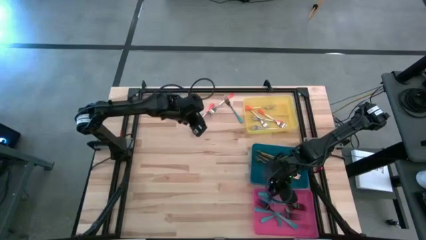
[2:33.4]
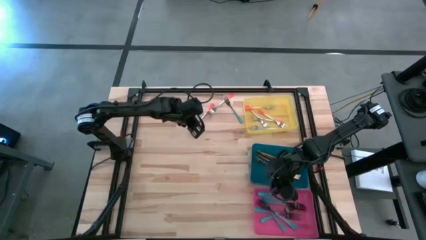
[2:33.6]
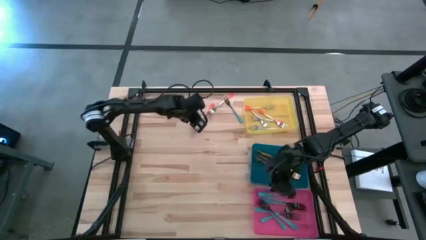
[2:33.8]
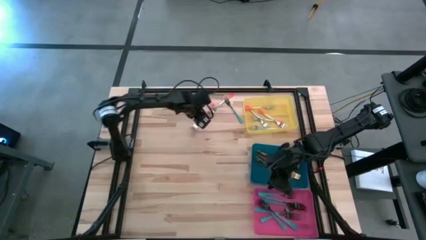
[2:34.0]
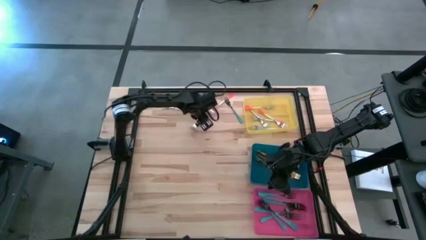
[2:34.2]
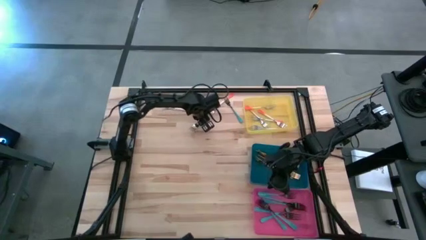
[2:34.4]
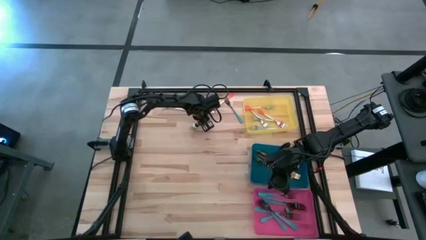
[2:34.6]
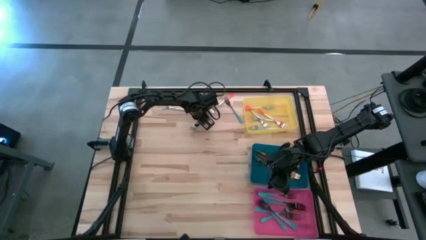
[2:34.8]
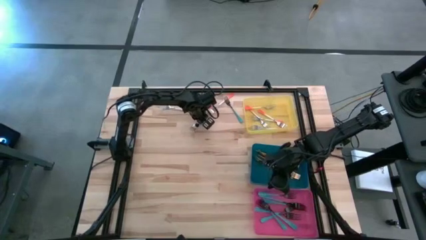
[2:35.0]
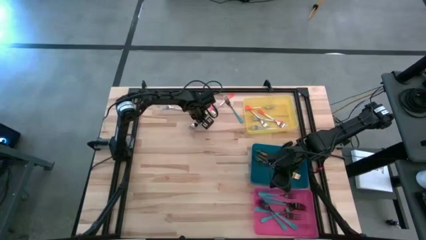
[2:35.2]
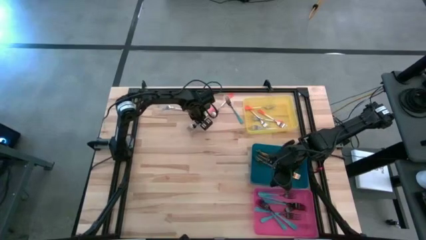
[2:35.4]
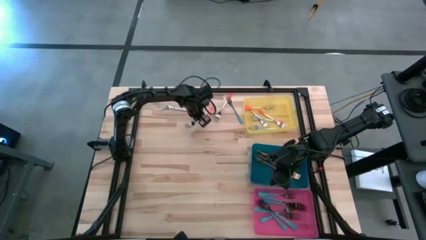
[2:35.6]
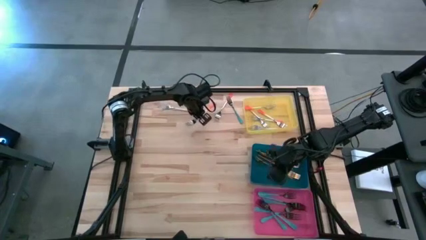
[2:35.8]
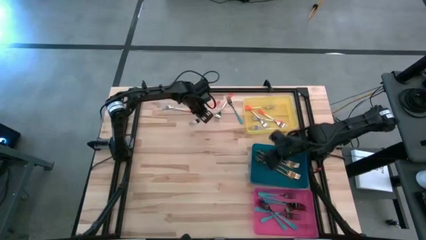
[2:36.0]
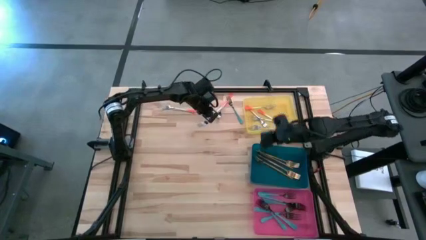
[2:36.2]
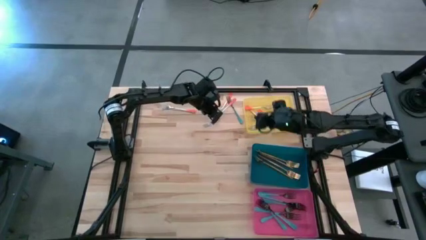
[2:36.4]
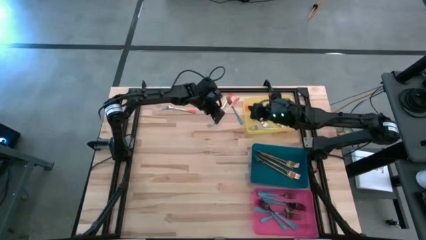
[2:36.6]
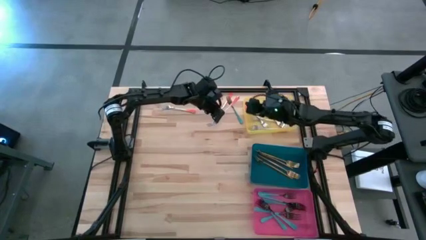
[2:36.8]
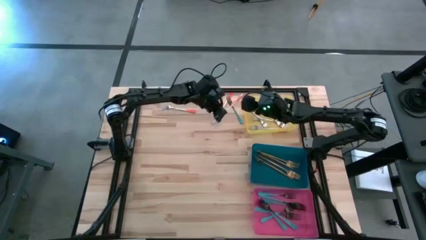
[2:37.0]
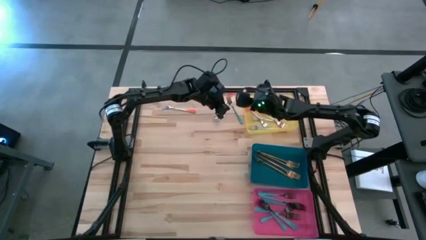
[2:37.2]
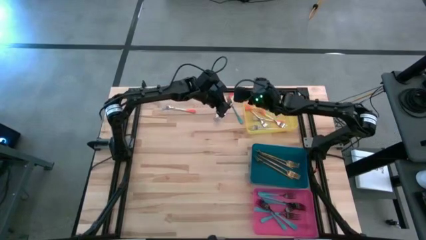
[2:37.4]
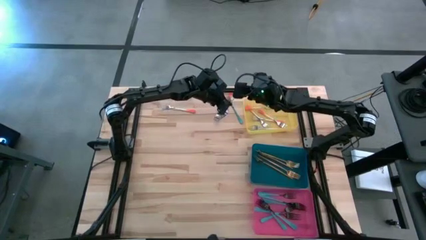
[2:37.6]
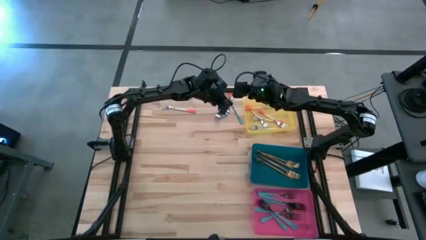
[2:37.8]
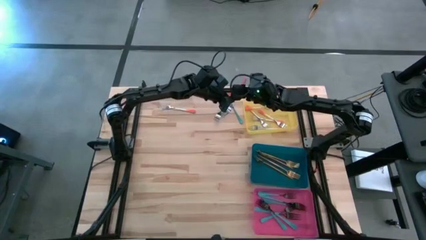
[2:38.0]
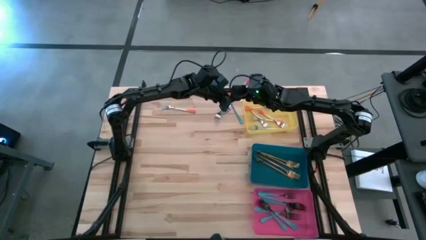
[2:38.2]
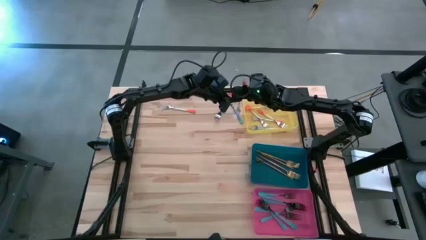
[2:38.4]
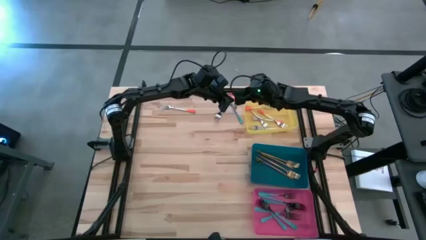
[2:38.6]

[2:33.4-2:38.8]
Task: Sort silverware by color (type)
Put the orange fork into the yellow bin

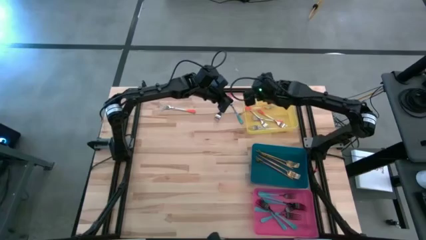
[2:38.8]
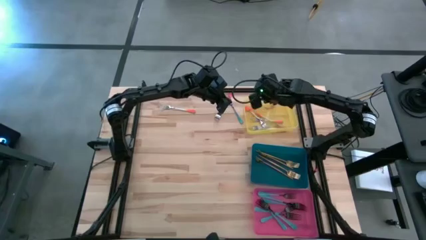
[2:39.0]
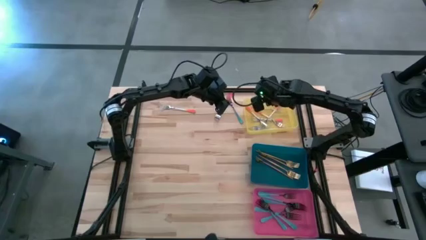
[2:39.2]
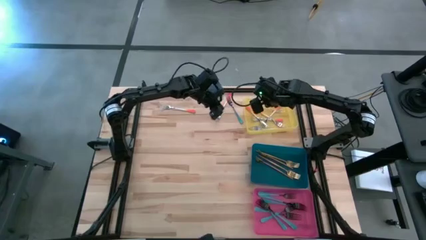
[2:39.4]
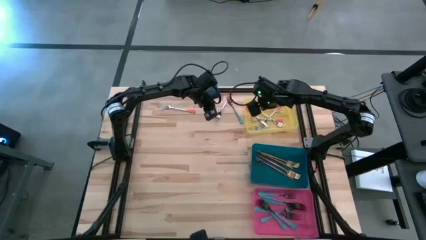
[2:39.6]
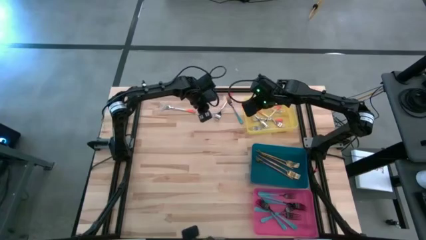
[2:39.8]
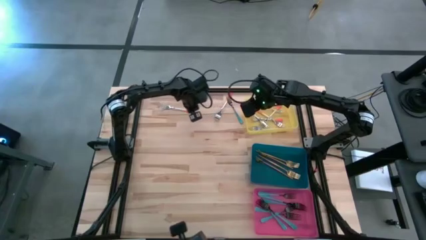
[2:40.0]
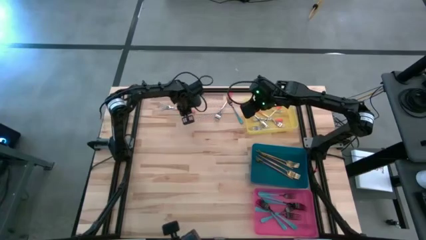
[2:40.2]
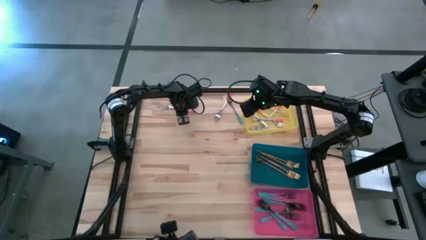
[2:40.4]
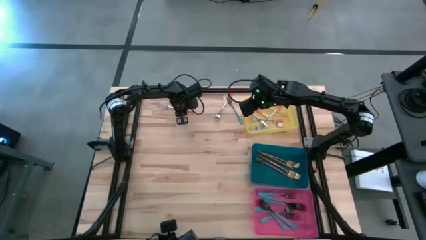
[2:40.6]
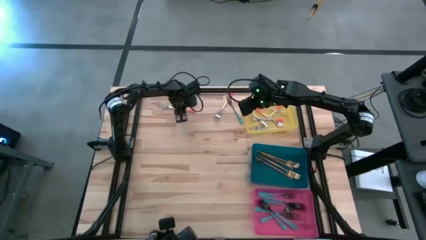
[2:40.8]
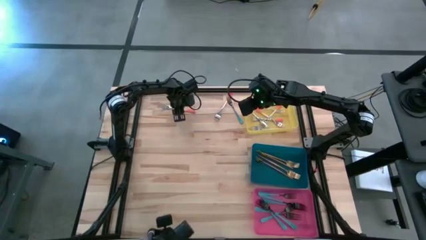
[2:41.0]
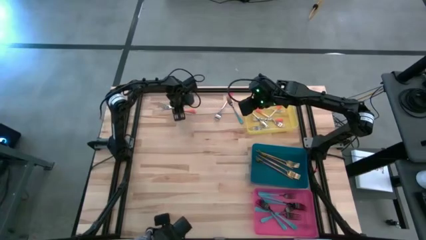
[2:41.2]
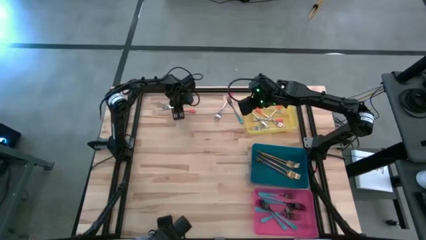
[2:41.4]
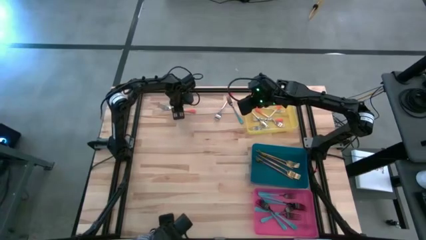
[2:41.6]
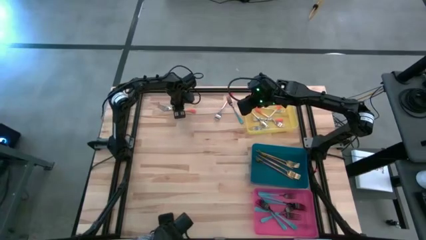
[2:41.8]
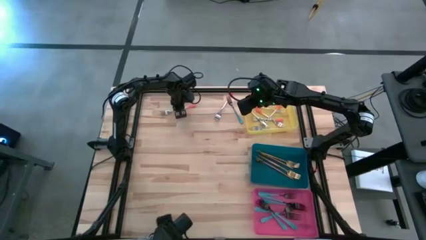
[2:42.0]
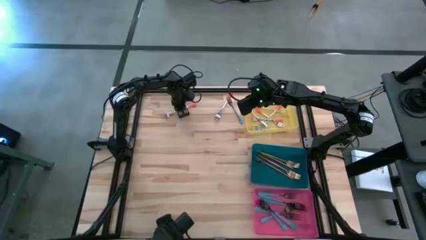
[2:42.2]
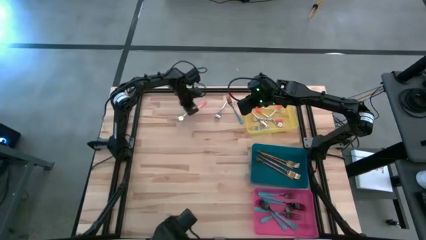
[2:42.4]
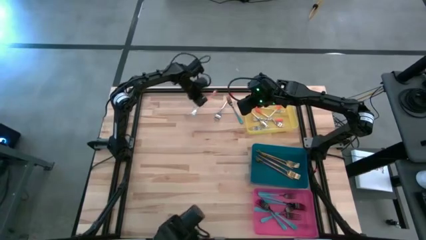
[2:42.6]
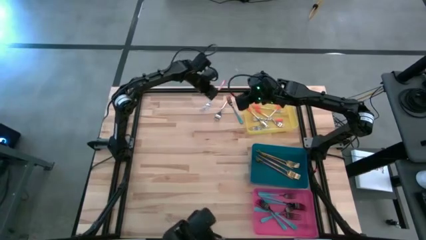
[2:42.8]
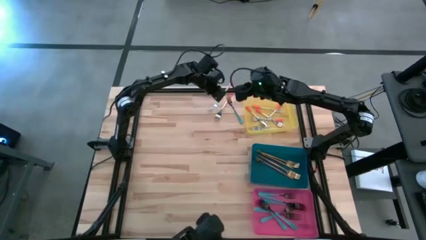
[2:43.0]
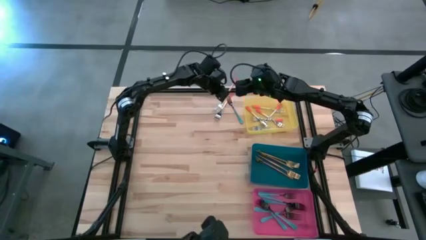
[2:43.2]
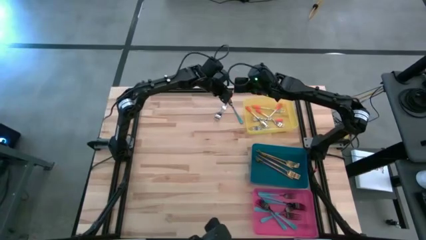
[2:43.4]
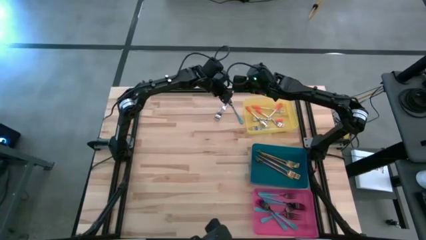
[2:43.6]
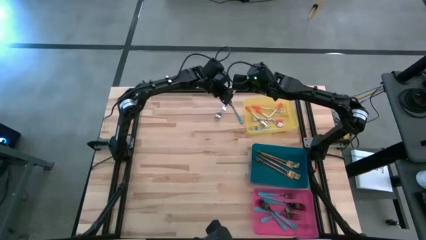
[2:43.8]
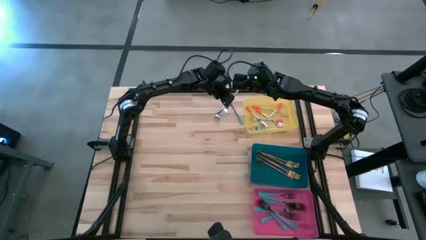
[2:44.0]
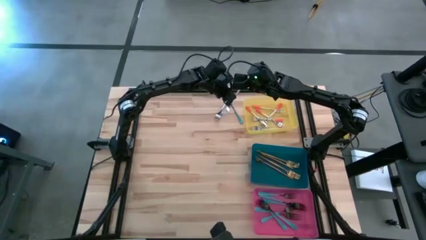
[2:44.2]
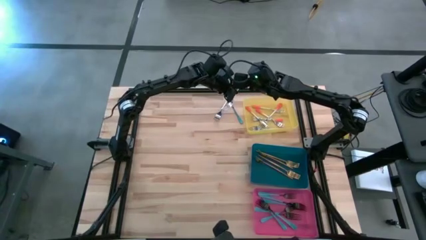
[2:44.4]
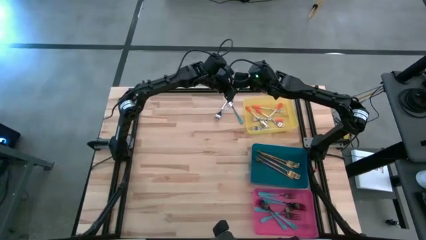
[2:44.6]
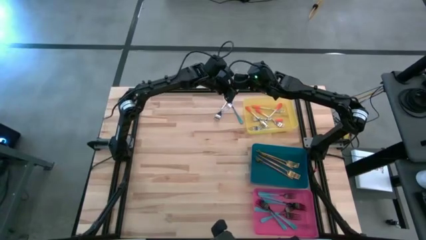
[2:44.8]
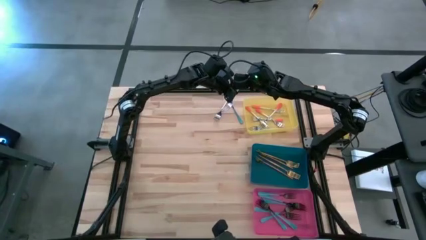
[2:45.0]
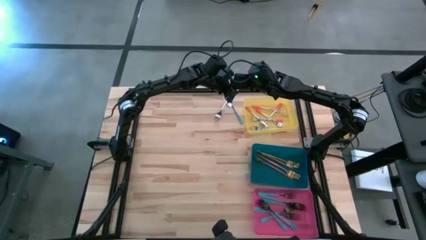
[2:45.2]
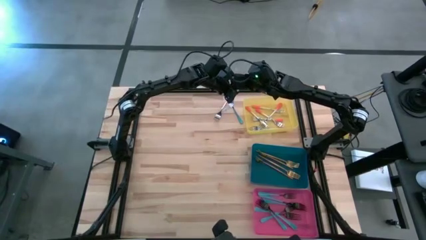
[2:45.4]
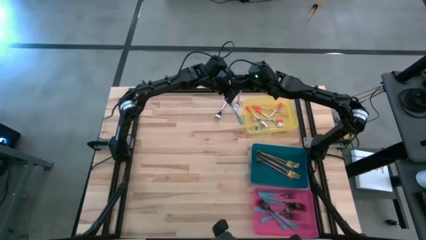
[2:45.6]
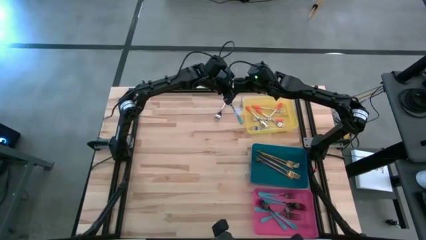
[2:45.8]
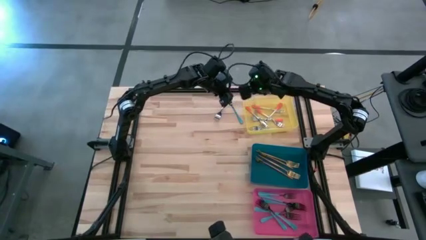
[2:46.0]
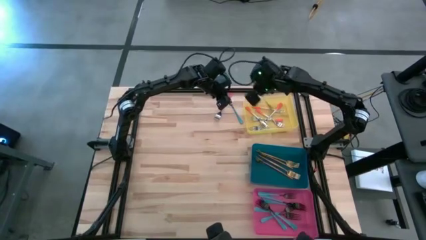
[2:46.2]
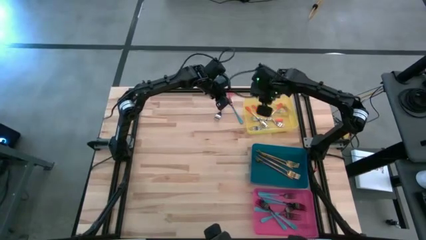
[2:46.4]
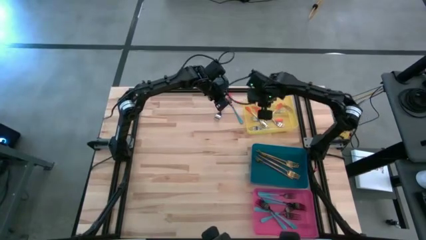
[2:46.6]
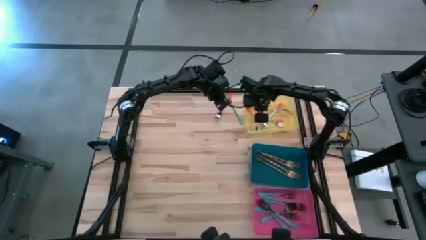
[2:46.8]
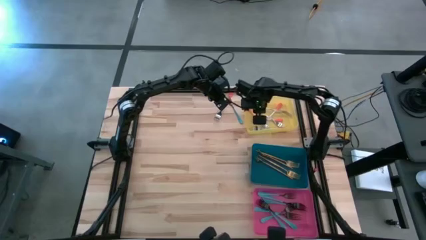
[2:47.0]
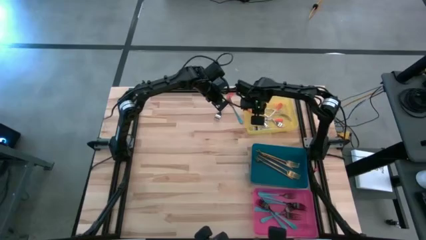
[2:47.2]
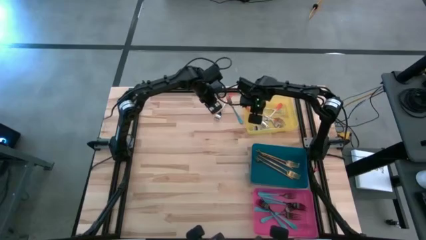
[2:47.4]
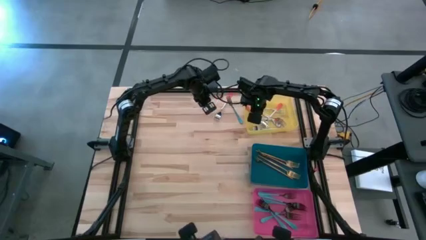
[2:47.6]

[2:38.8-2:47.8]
Put the orange fork into the yellow bin

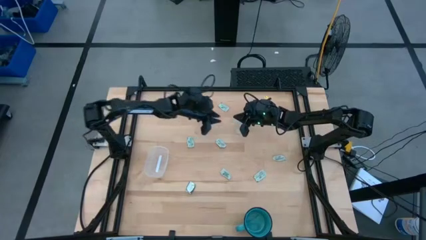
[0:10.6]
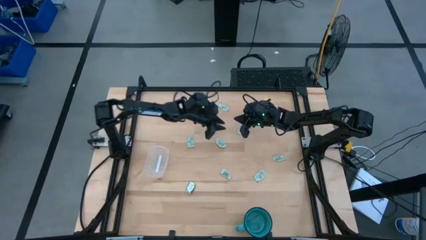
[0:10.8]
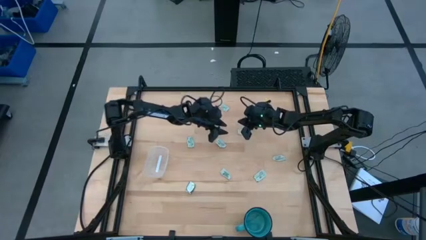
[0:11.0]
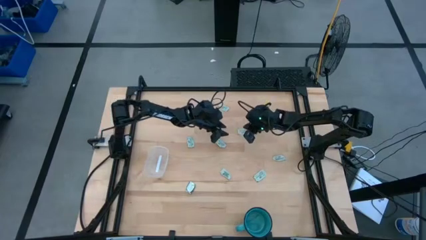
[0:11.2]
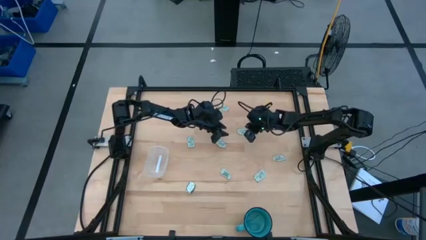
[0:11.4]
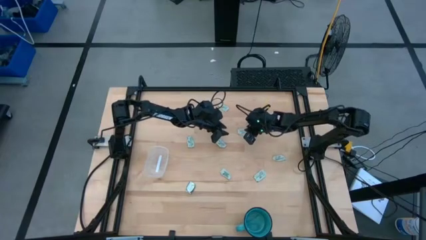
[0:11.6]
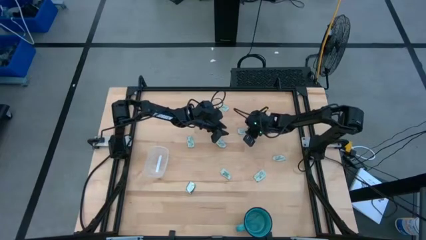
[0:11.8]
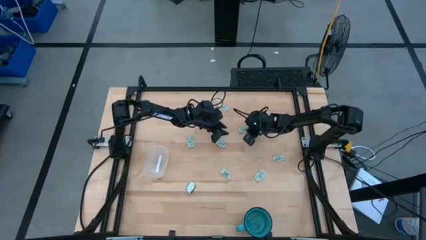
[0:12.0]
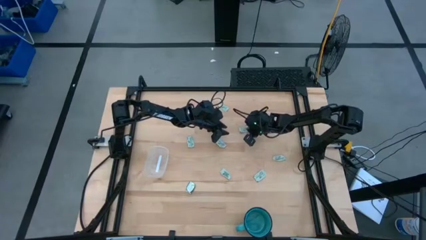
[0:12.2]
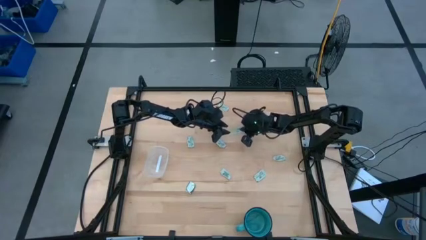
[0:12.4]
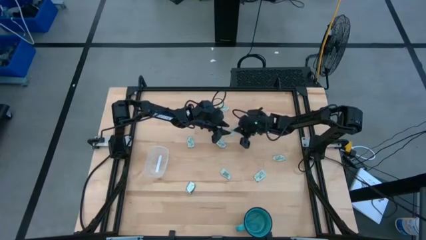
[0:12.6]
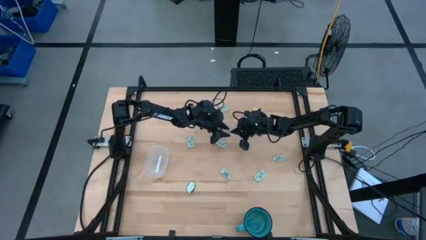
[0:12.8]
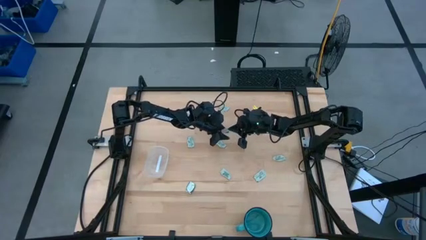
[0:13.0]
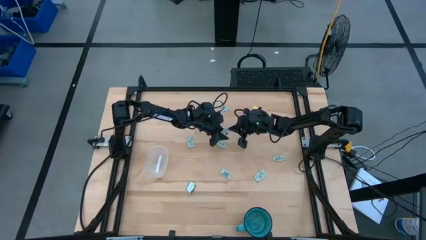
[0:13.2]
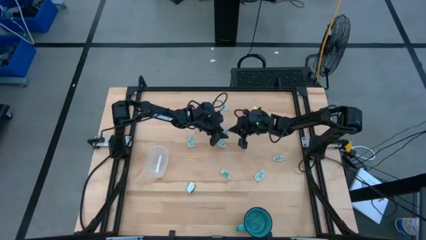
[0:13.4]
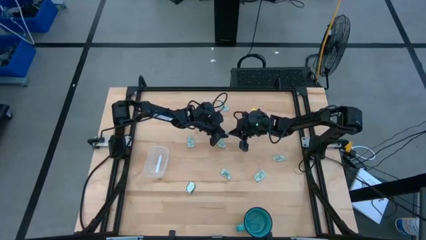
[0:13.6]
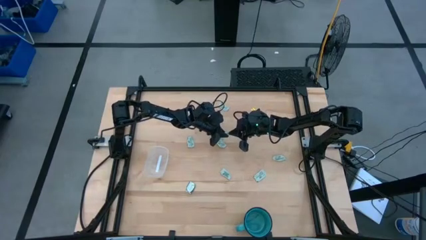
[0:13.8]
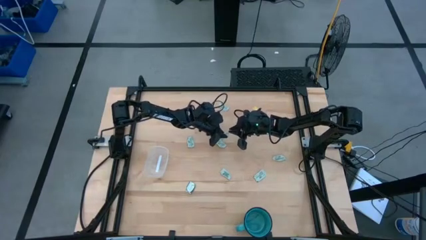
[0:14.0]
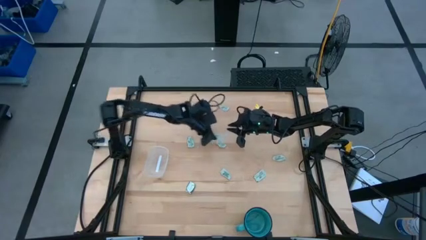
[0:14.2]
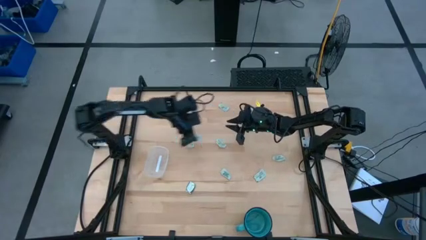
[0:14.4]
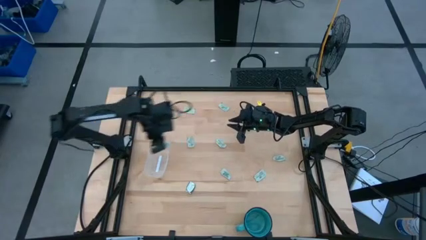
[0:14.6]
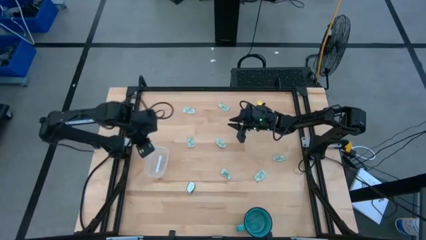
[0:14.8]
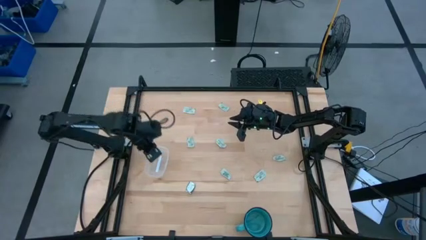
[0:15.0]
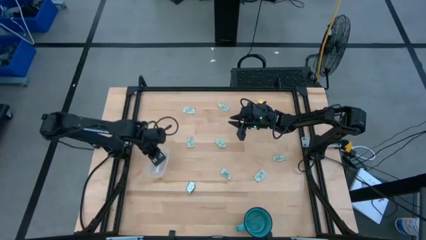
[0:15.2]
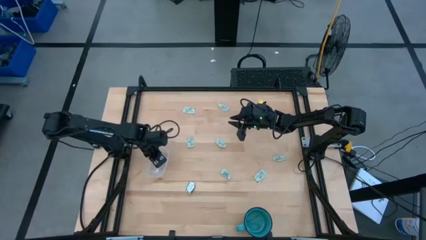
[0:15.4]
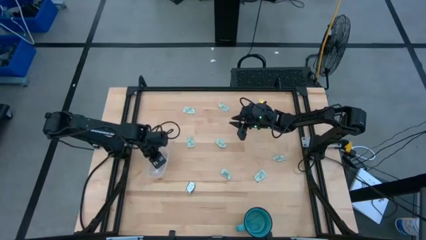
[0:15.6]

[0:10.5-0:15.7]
Task: Pick and place Stevia / Truvia into bins
Put the light green stevia packet into the transparent bin
